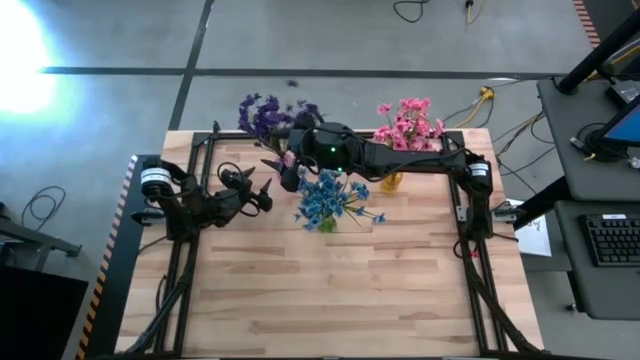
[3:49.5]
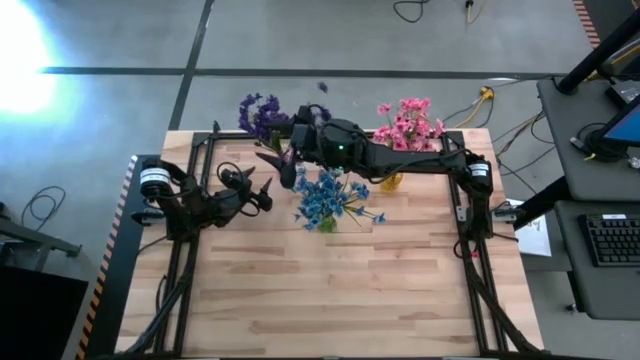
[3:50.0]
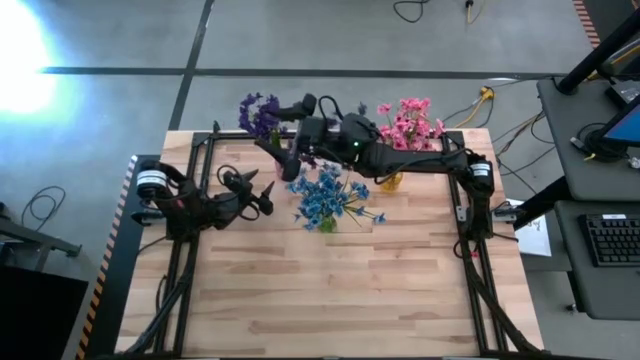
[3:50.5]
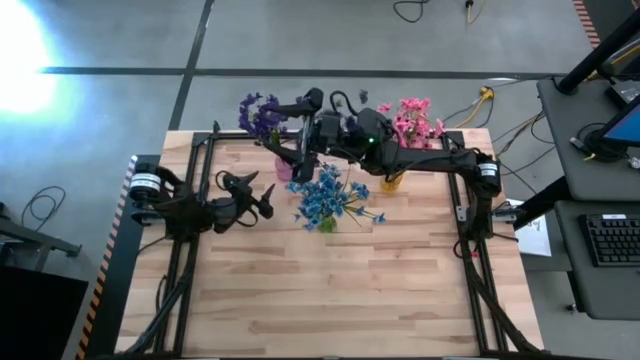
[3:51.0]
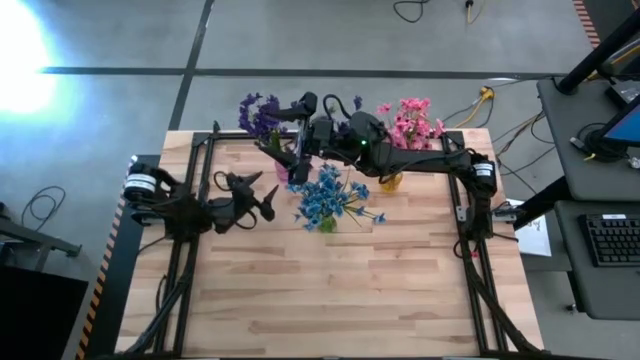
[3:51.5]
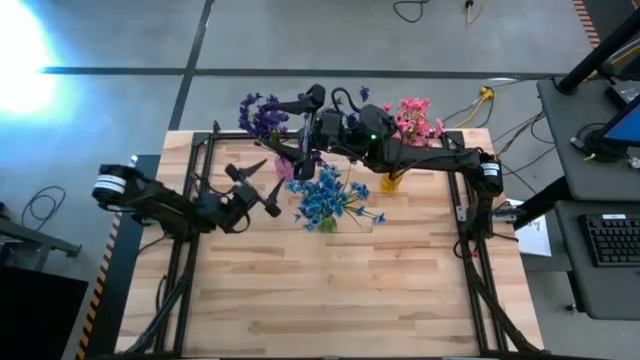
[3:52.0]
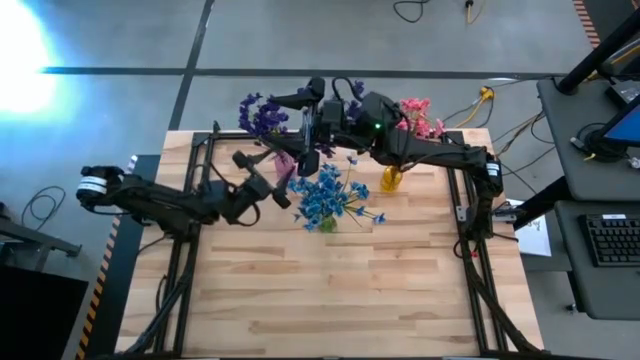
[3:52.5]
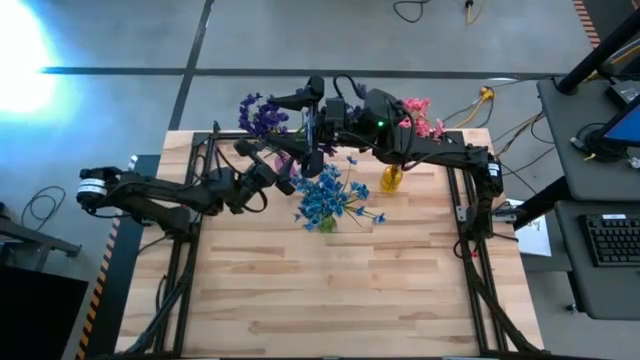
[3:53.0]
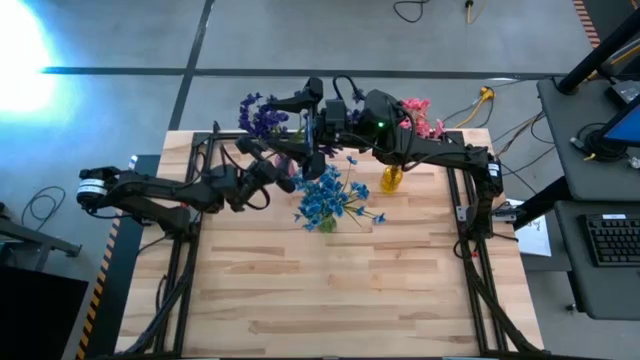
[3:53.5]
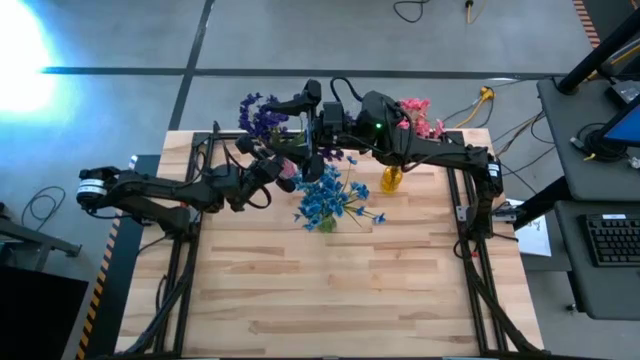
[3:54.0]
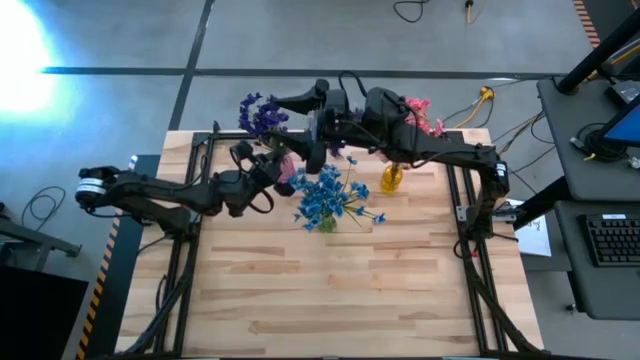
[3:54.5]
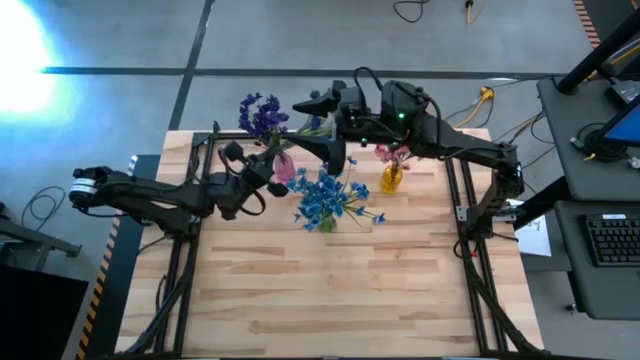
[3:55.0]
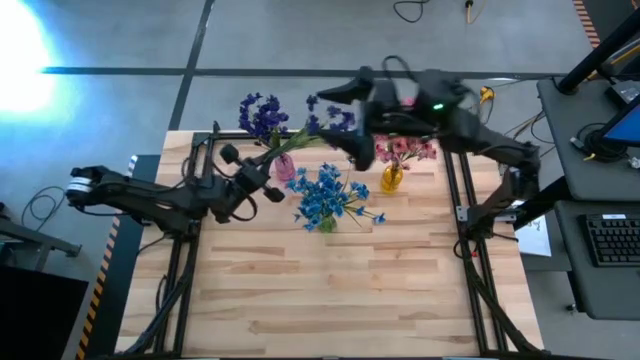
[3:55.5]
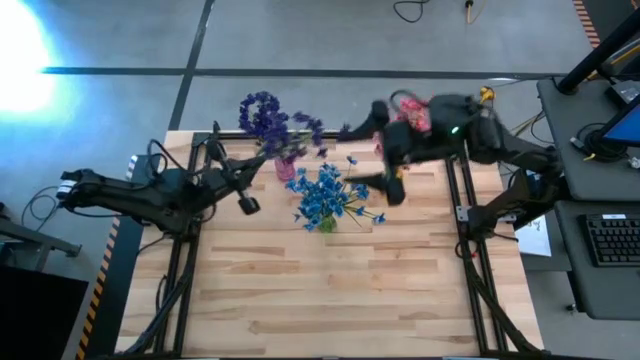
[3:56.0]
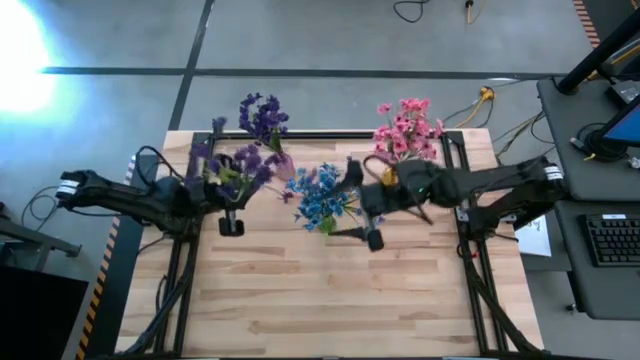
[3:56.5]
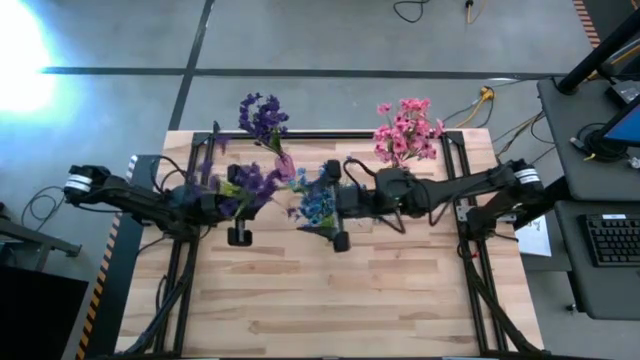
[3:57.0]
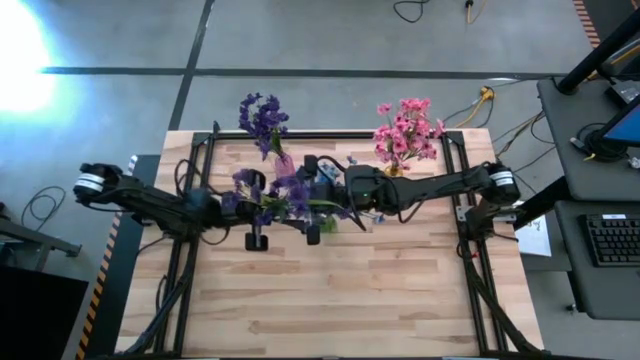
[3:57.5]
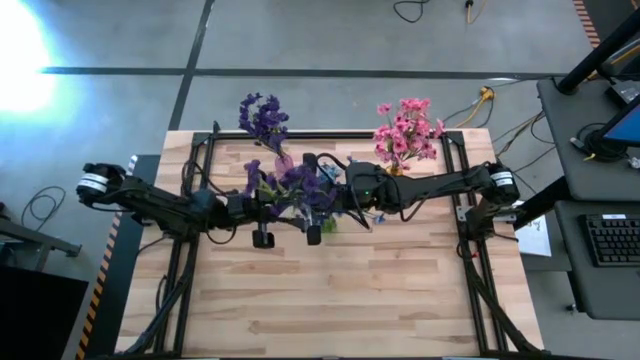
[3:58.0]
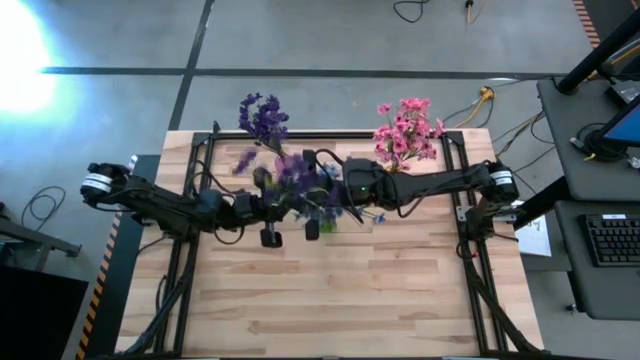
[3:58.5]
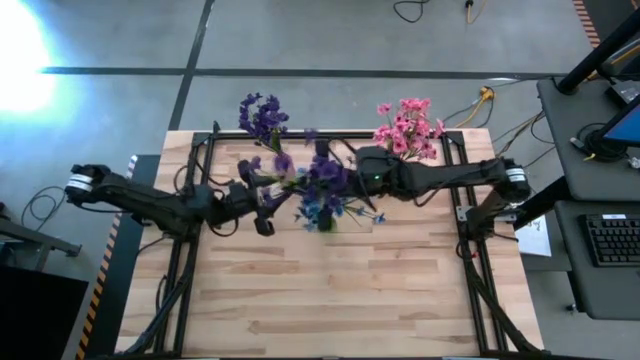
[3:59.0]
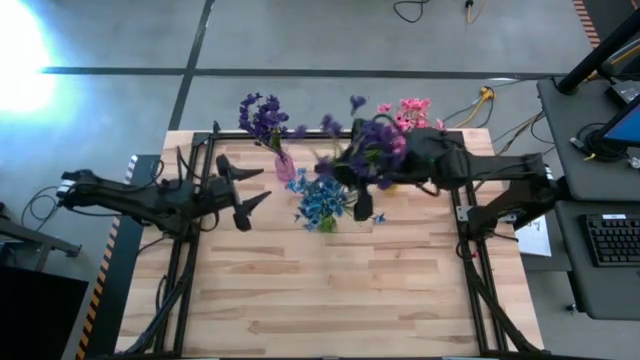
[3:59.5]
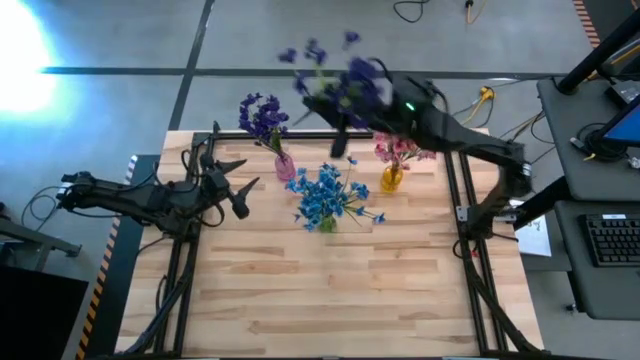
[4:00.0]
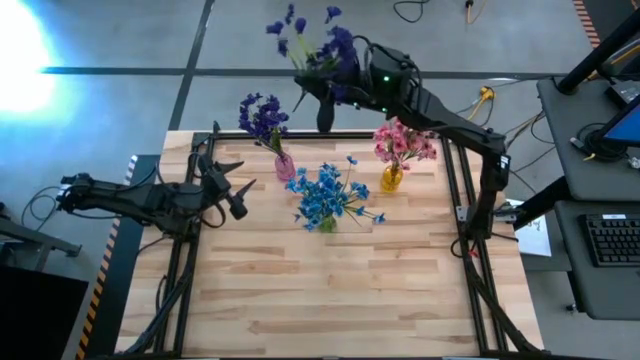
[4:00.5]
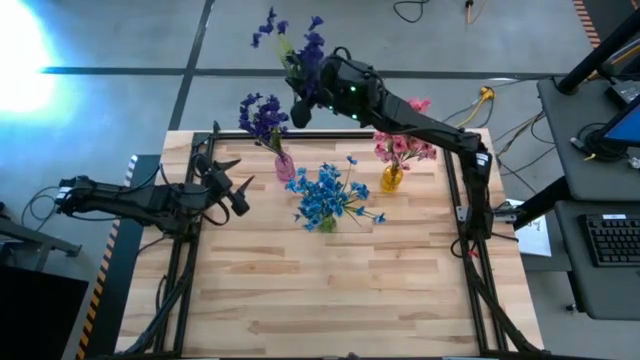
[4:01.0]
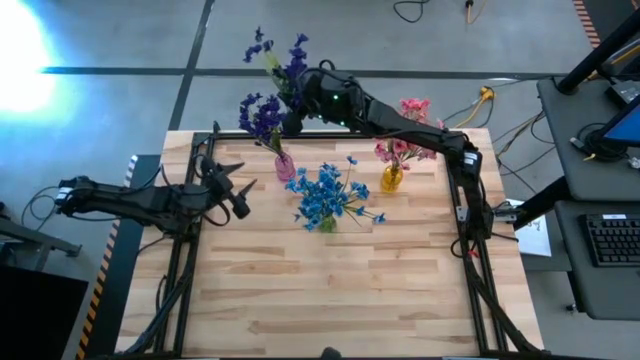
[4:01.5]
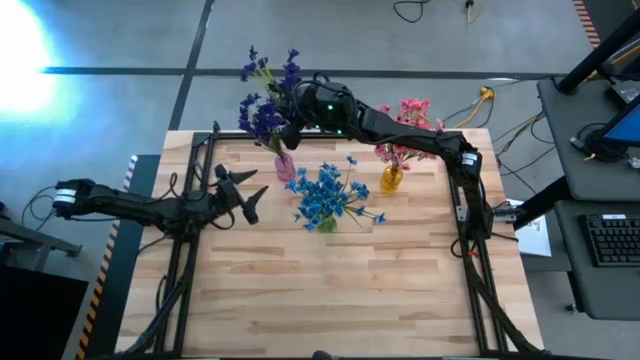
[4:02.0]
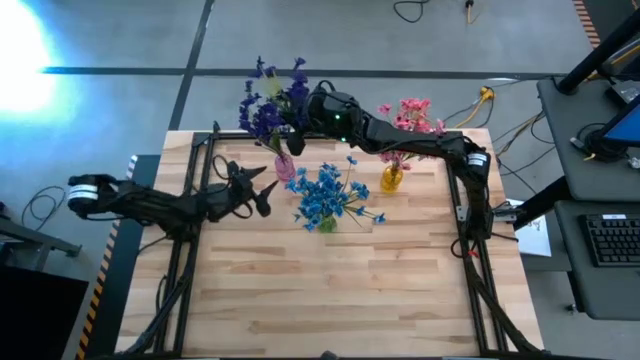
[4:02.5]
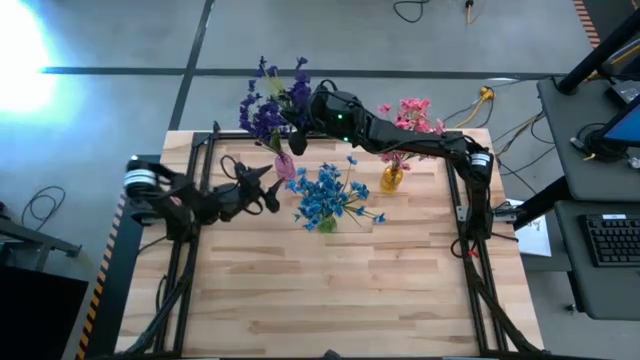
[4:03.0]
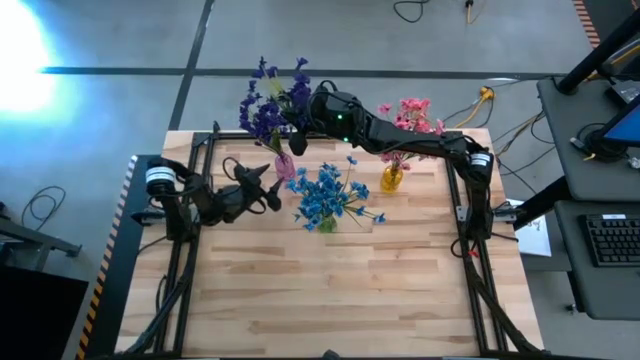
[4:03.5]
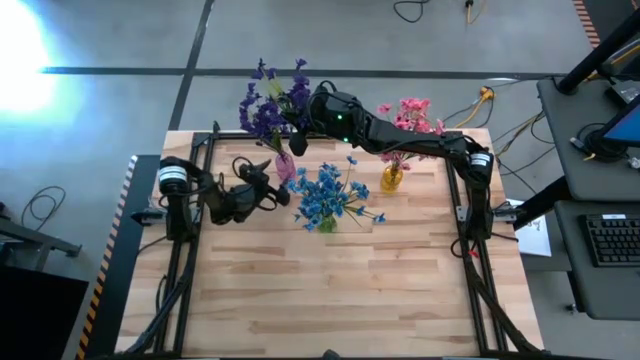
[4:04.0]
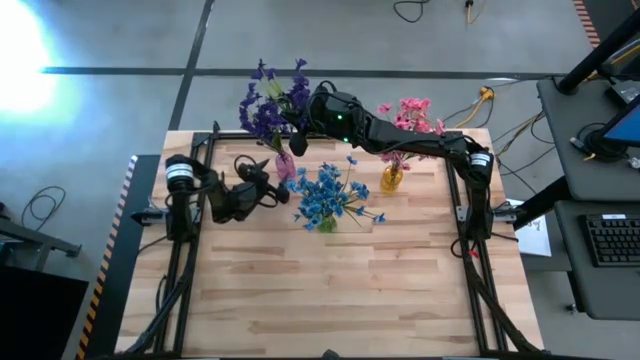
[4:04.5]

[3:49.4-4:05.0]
Task: Sort flowers into vase by color
Put the violet flowers into the violet vase

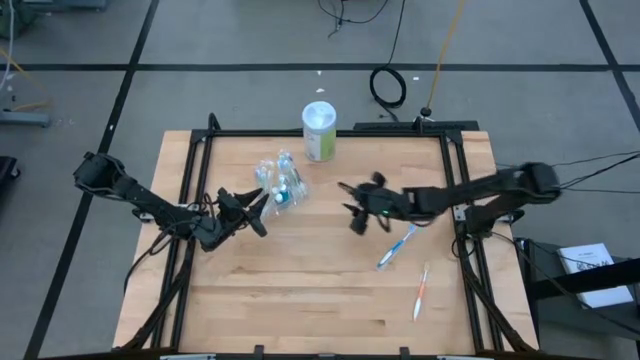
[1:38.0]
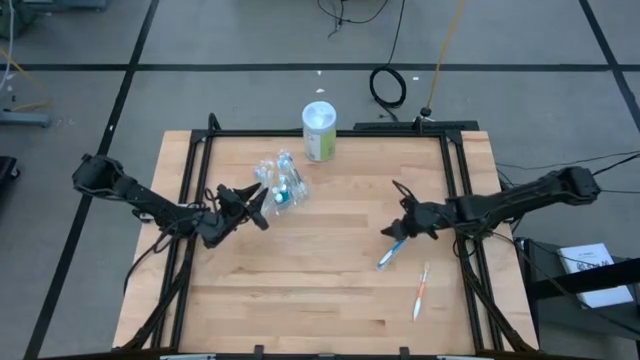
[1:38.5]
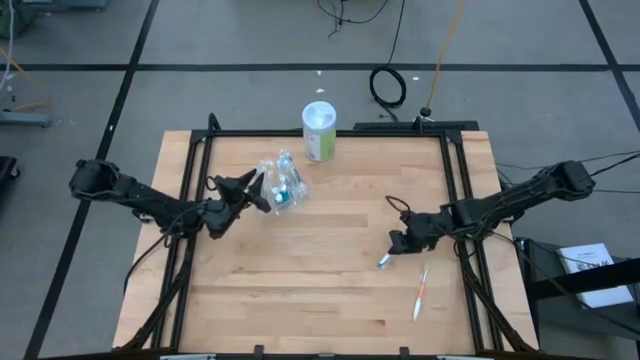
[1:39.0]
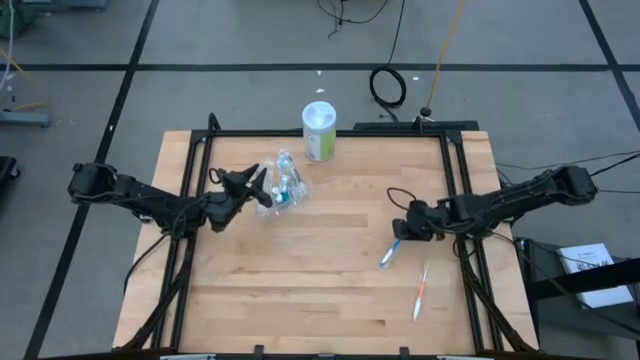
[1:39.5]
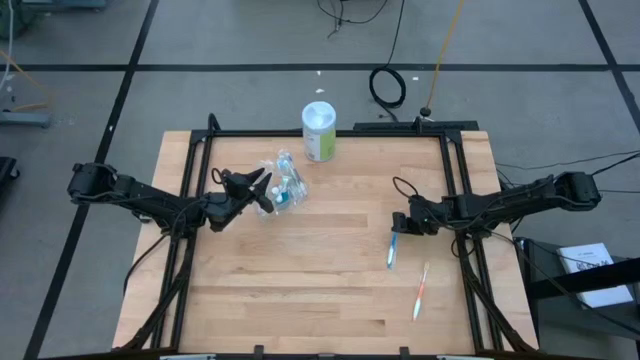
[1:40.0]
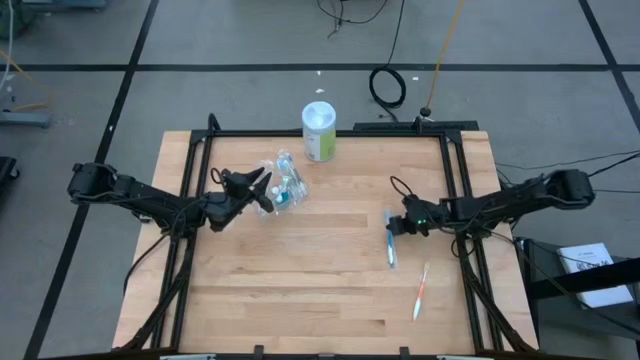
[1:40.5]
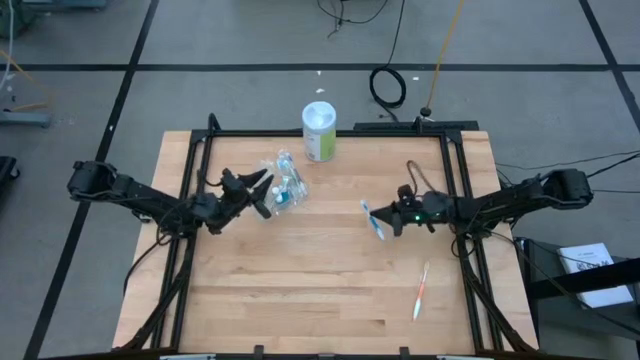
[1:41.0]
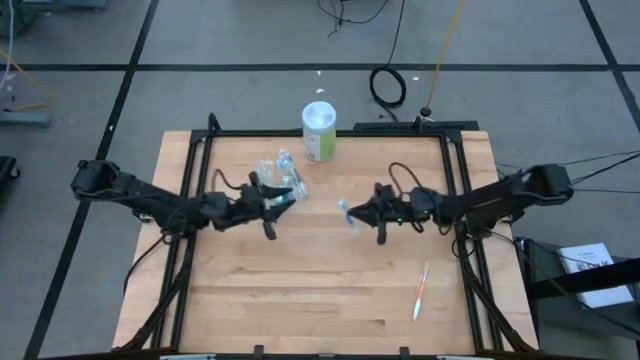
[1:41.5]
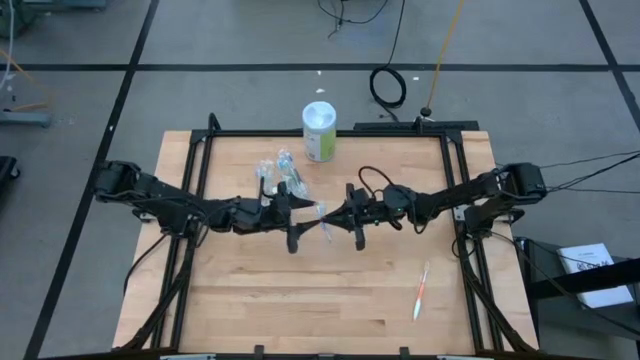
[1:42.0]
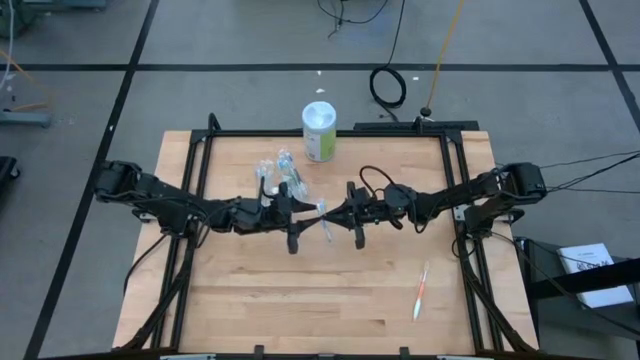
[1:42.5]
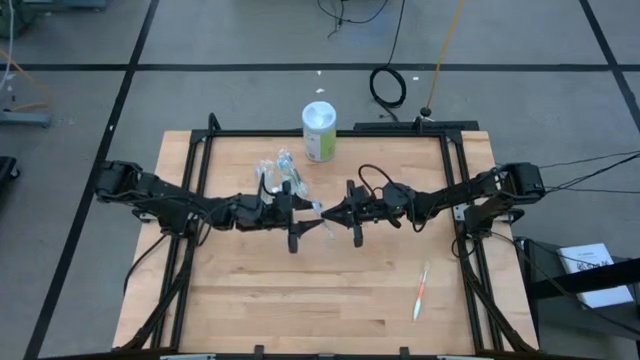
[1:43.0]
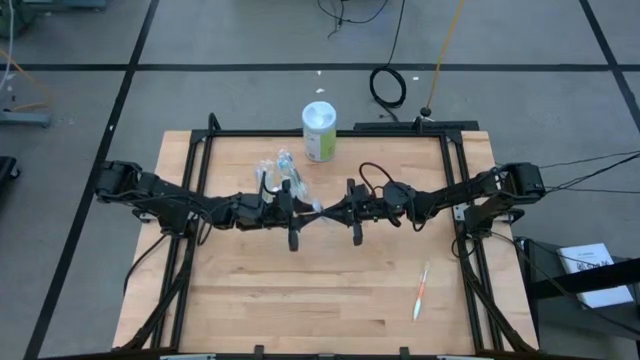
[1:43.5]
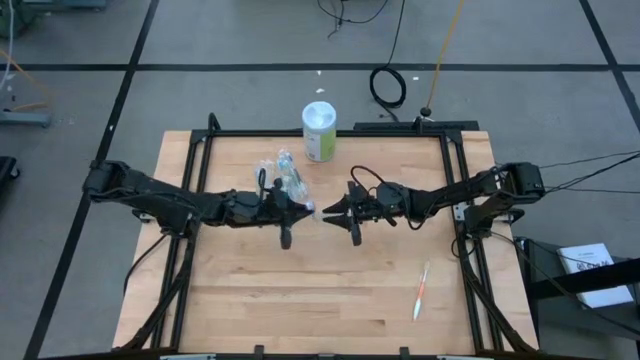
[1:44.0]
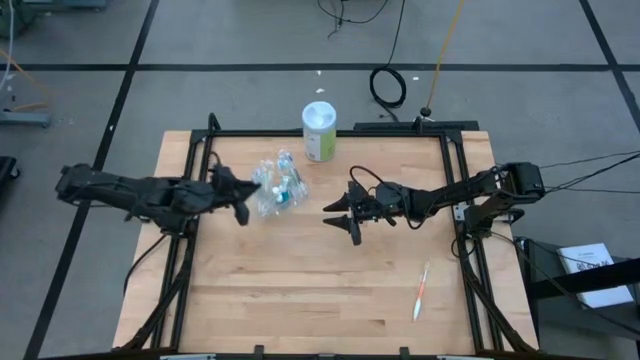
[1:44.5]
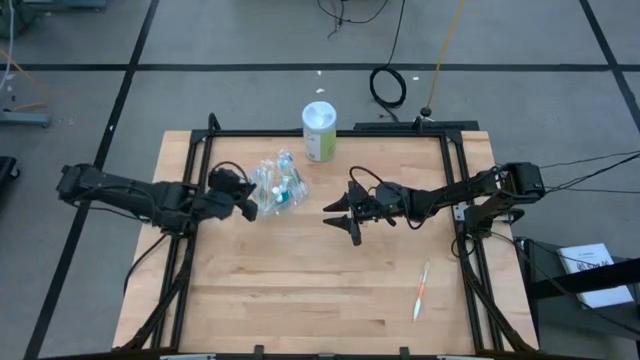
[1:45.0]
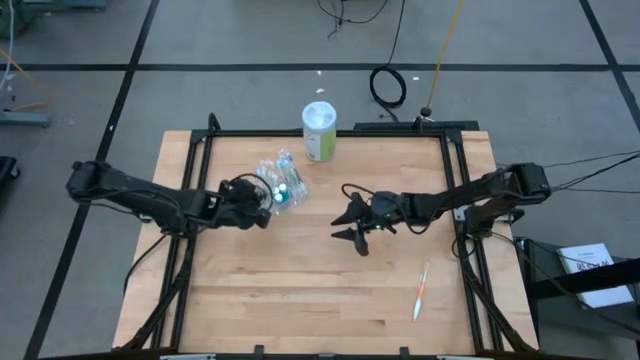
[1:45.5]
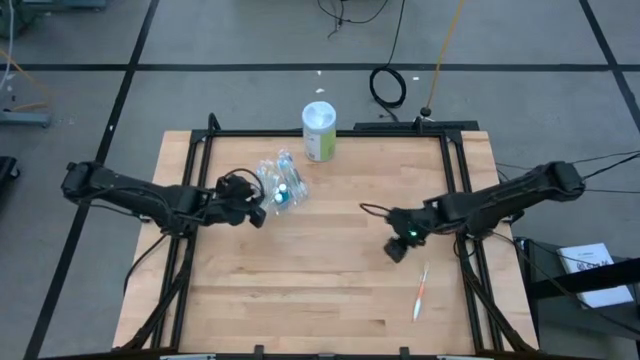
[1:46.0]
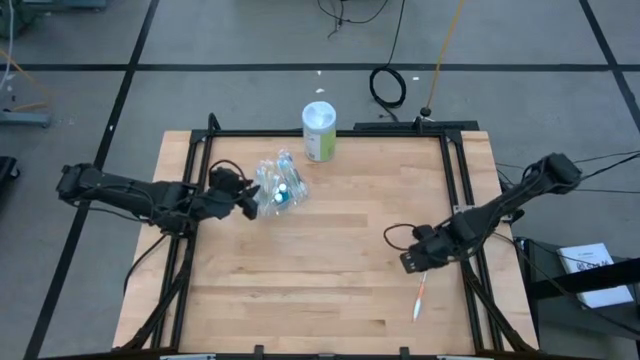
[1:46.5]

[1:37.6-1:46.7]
Task: Pick & Place toothbrushing station
Put the blue toothbrush into the transparent organizer
